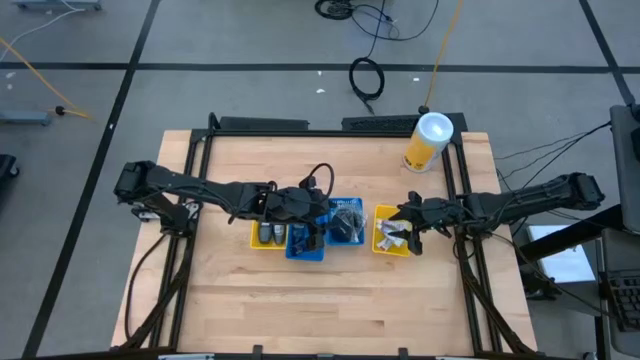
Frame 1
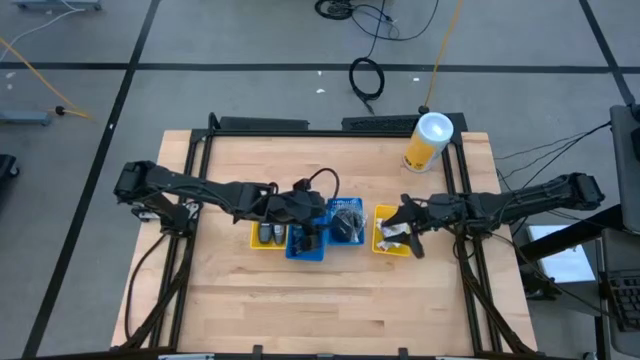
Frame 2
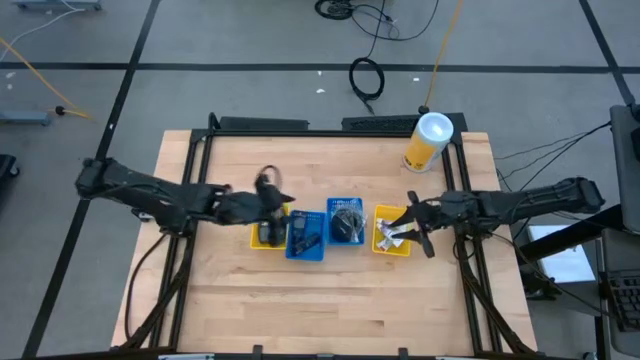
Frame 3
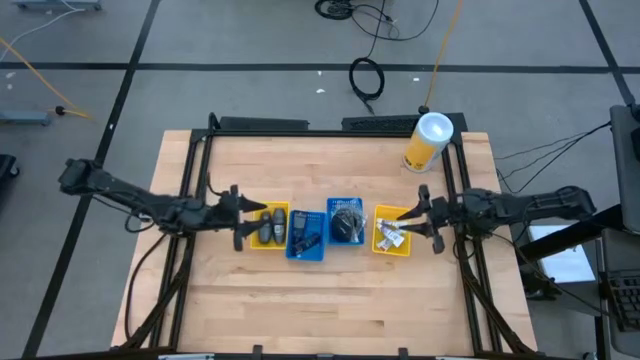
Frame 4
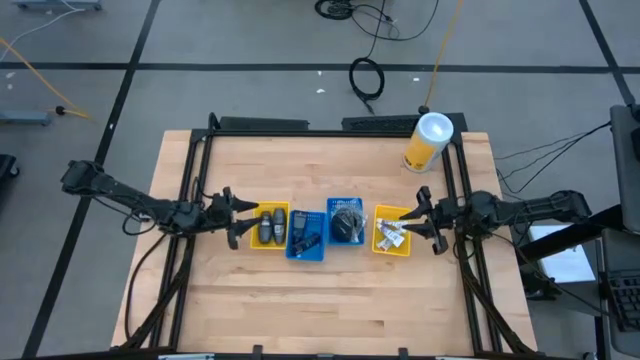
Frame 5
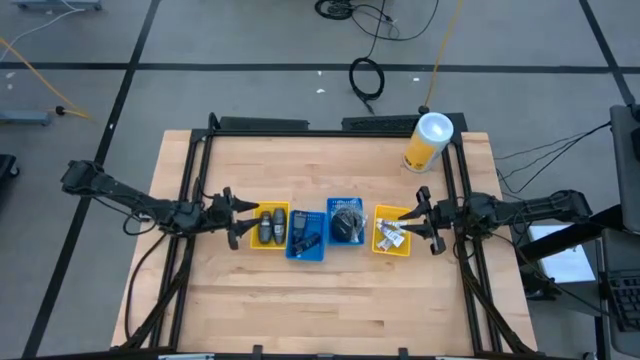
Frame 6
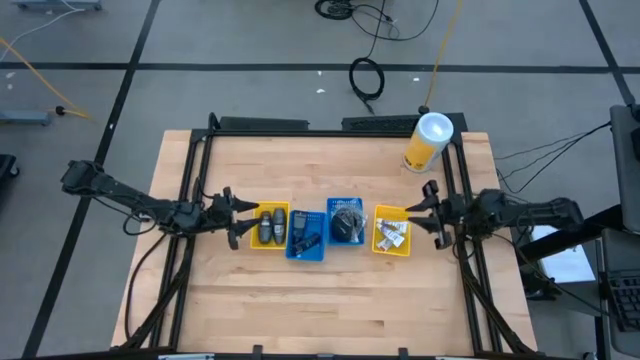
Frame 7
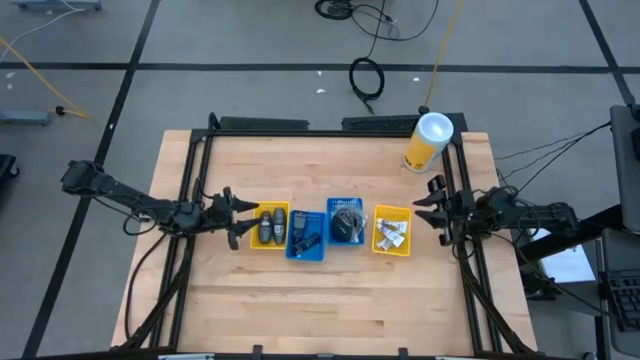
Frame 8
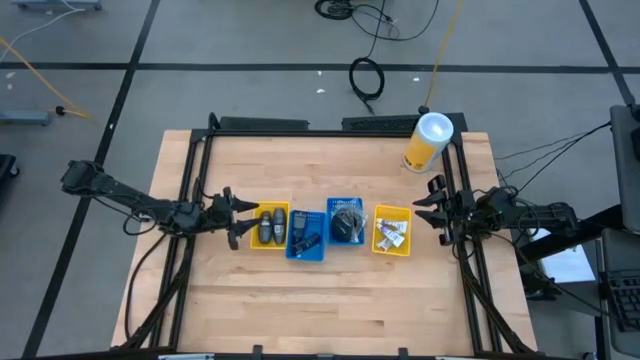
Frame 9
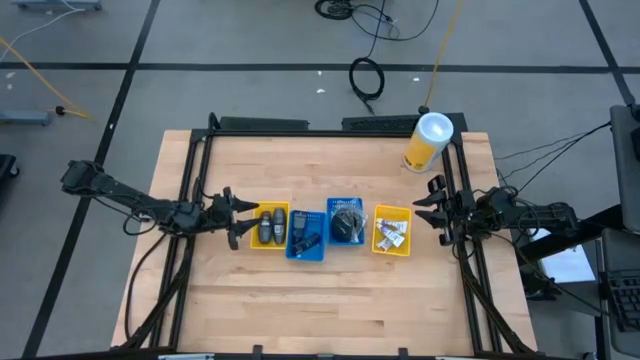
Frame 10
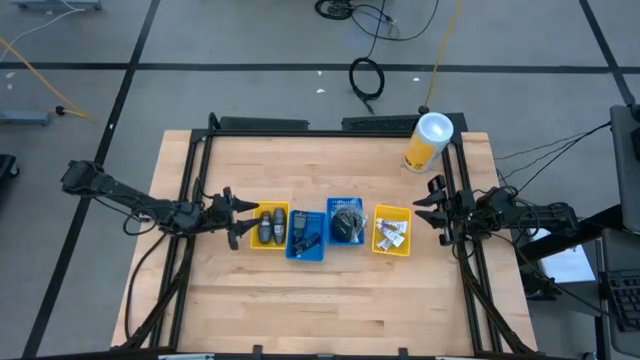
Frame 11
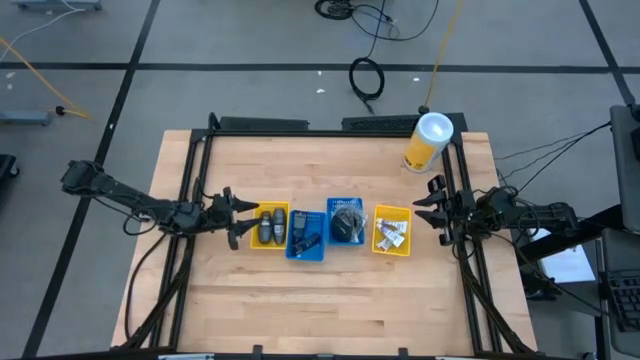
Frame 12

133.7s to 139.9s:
Task: Pick & Place Travel size toiletries
Return to Home Position

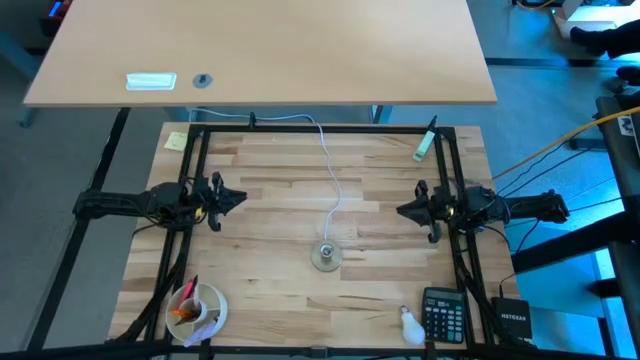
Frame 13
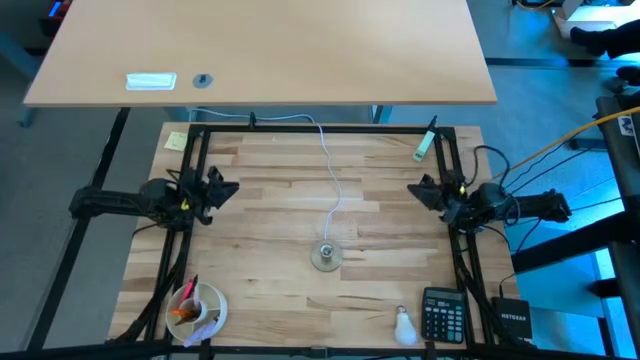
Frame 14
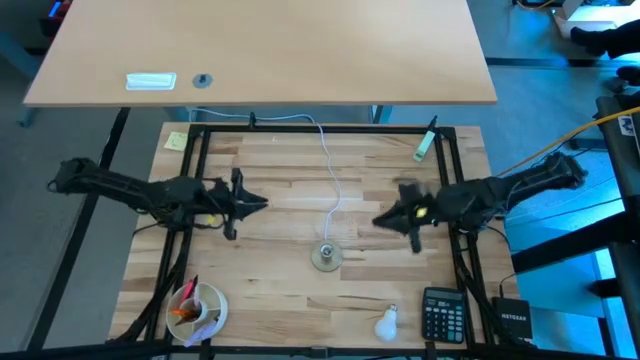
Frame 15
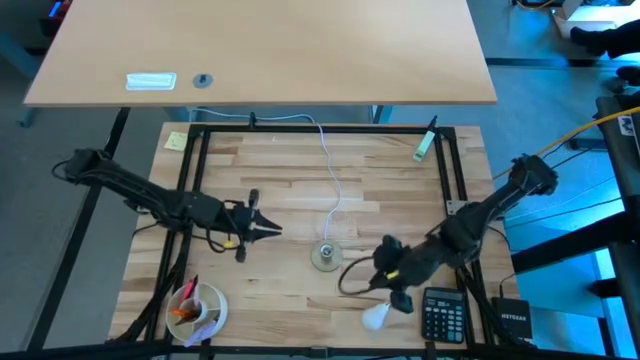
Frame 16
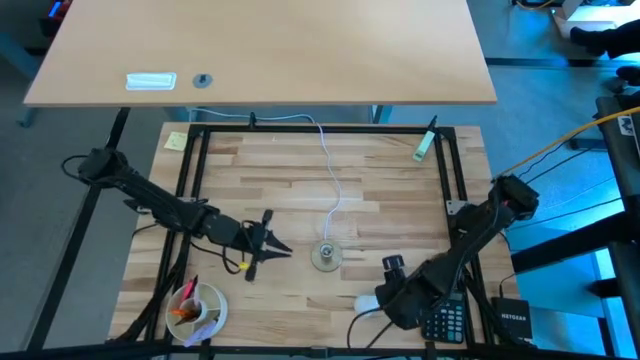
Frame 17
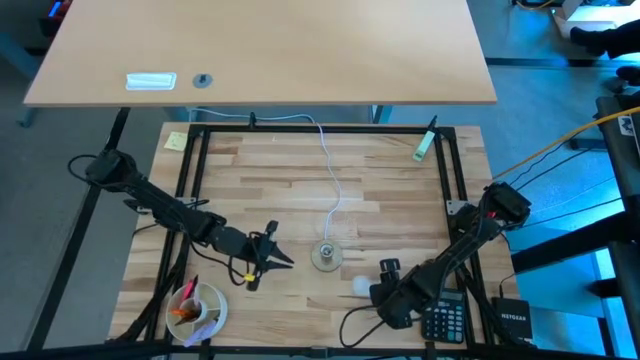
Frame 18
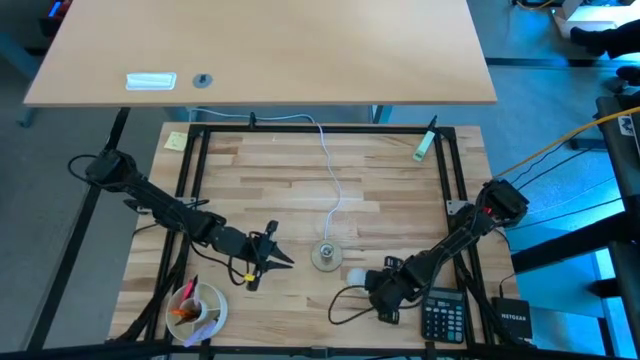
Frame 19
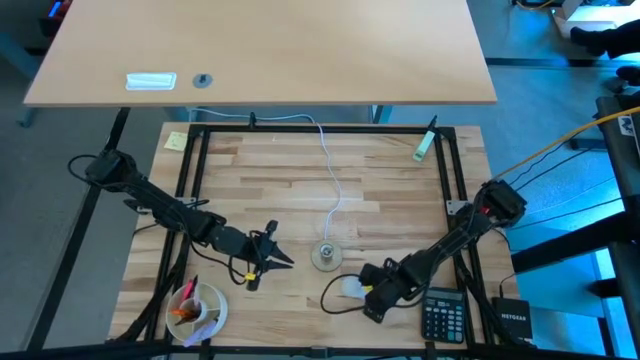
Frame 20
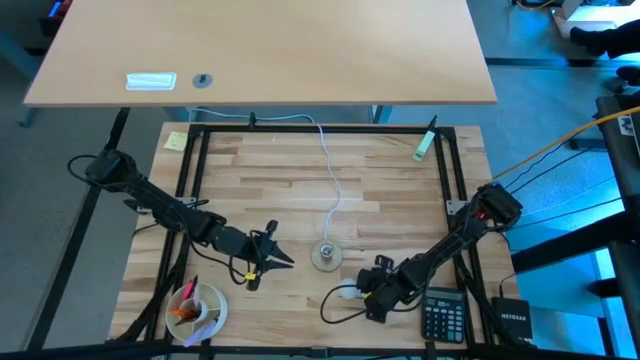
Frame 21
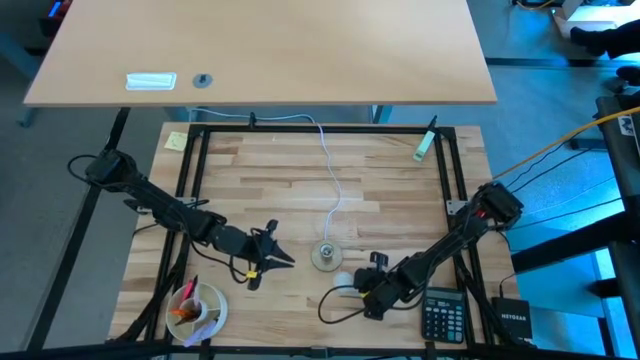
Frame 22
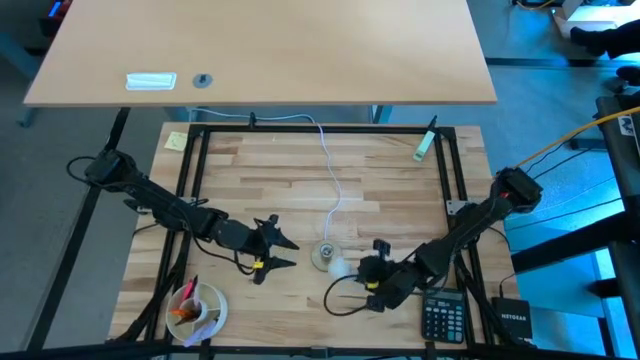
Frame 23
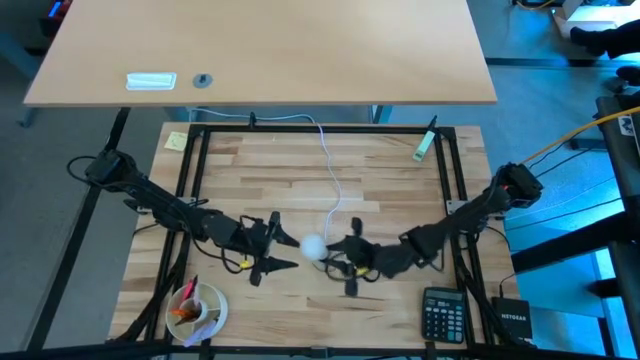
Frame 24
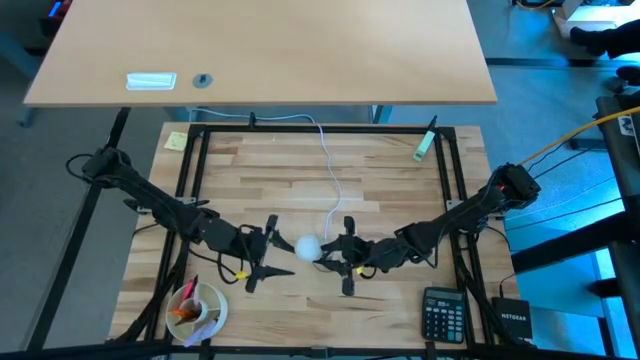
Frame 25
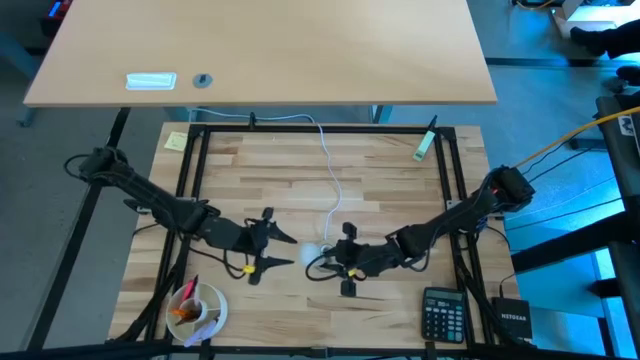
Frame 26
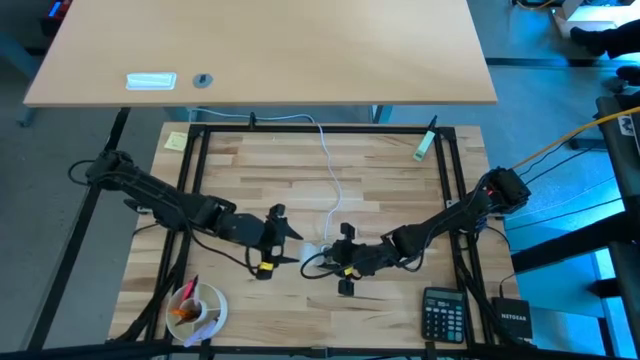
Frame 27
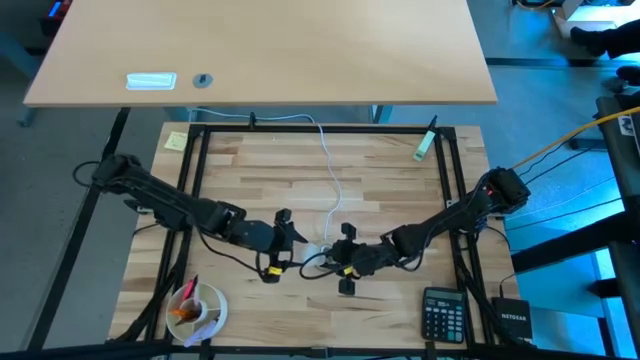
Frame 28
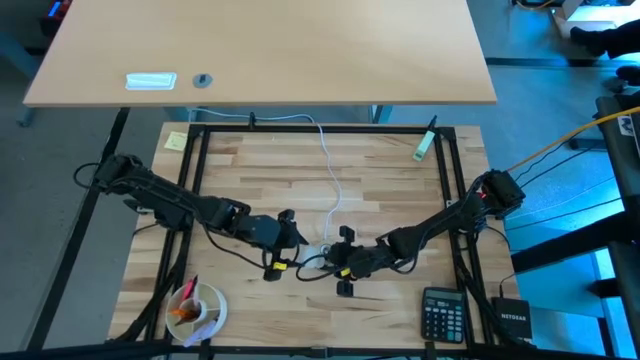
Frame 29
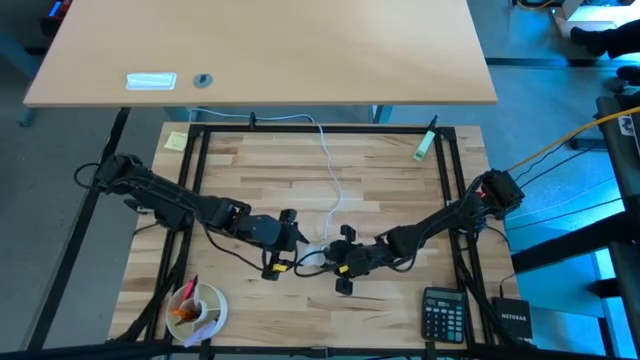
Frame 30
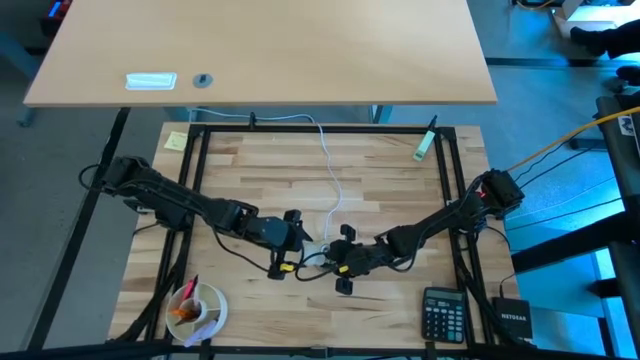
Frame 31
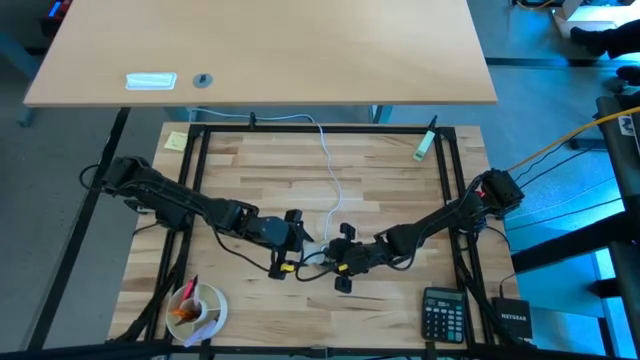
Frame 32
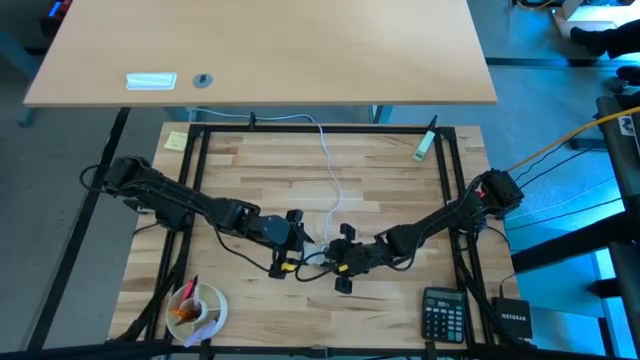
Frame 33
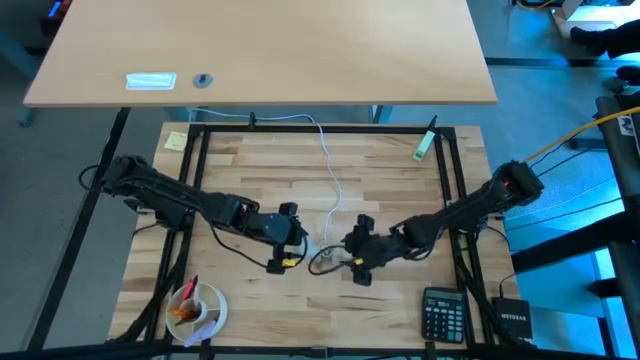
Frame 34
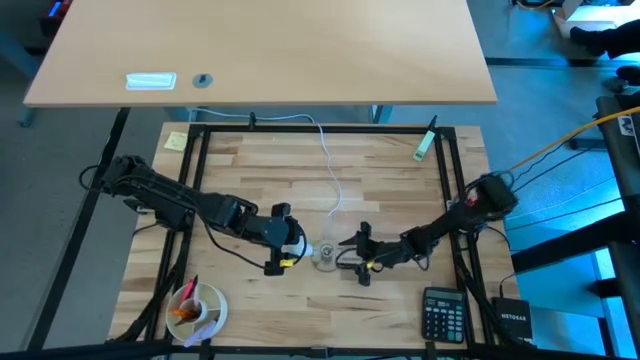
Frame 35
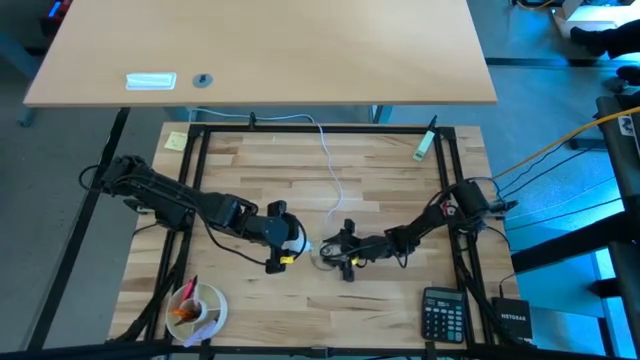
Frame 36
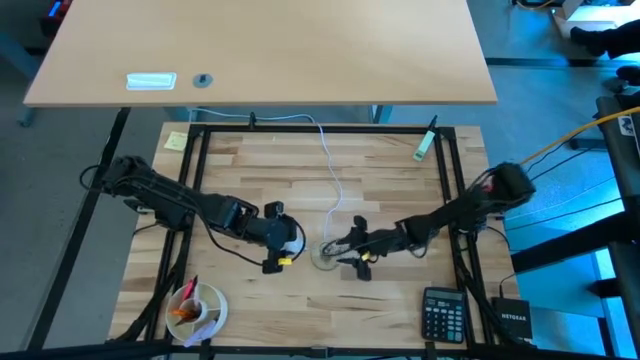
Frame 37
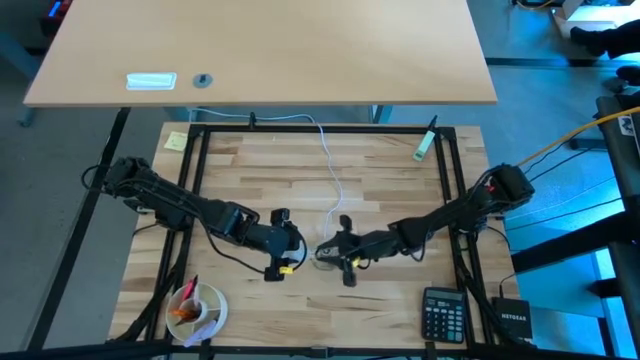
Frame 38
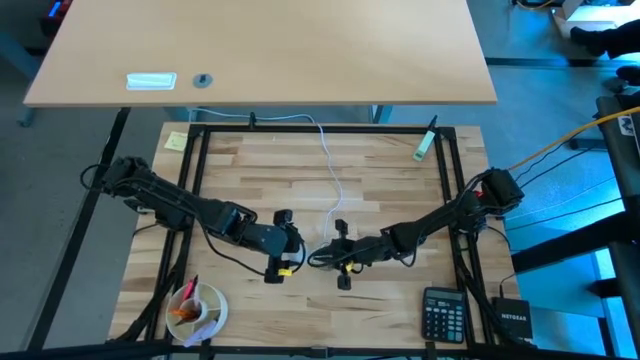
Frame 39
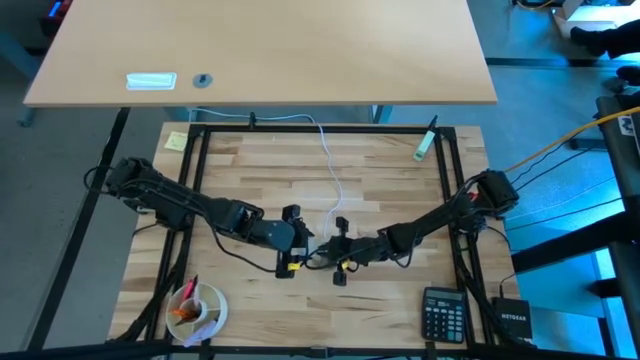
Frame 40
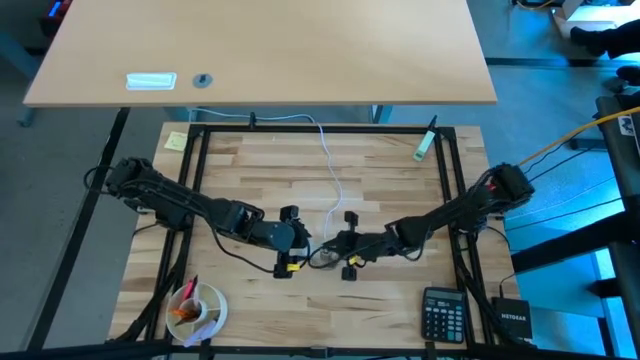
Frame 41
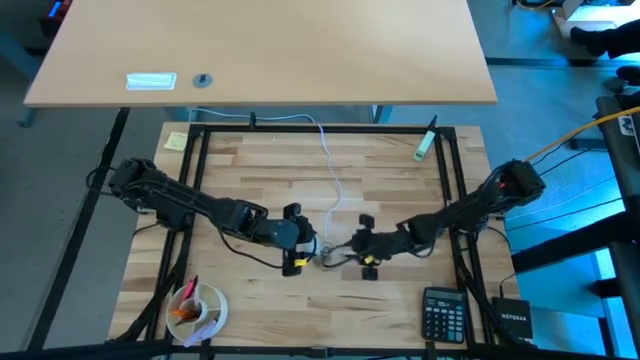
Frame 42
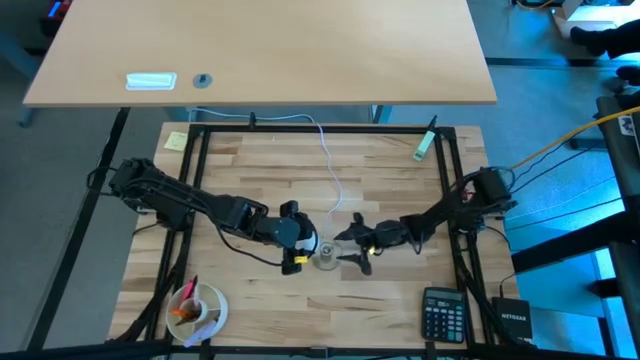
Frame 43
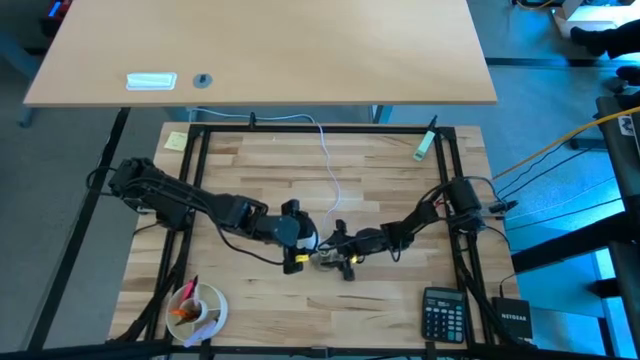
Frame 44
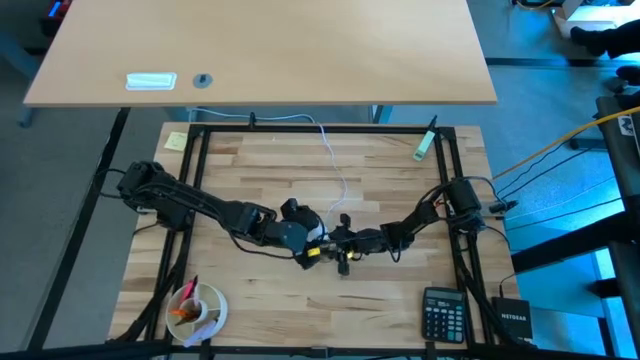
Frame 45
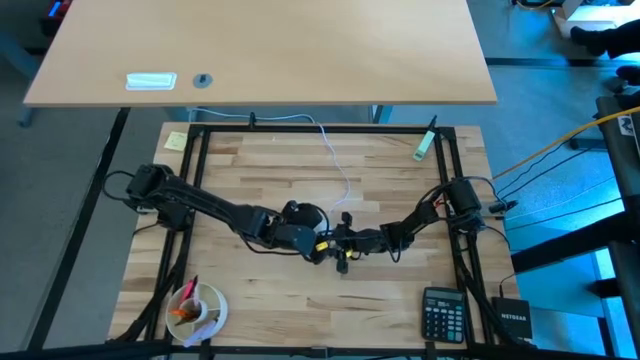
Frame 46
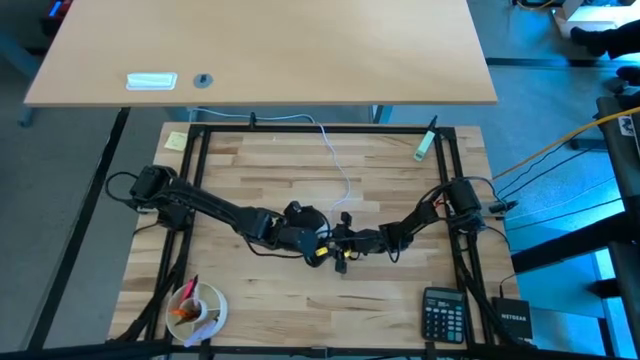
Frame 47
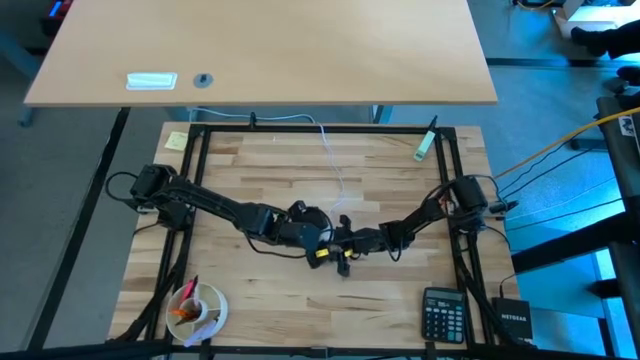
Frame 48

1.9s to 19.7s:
Task: Screw lightbulb
Insert the white lightbulb into the silver lamp
